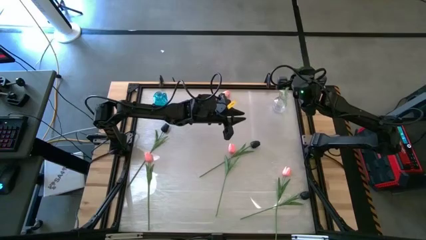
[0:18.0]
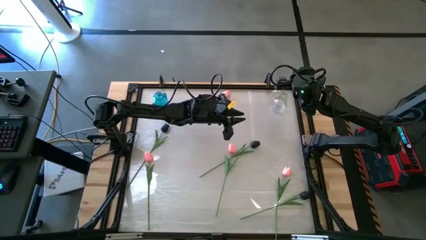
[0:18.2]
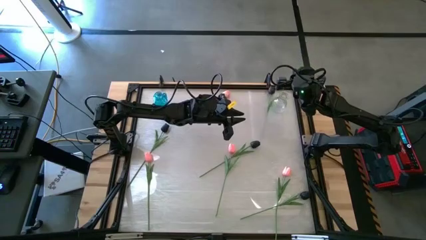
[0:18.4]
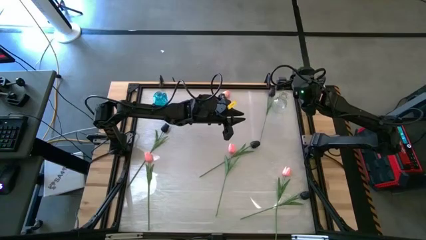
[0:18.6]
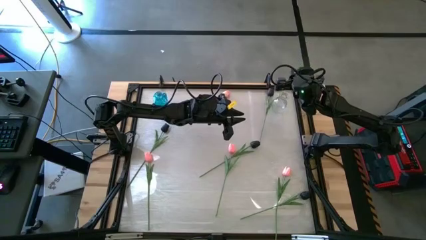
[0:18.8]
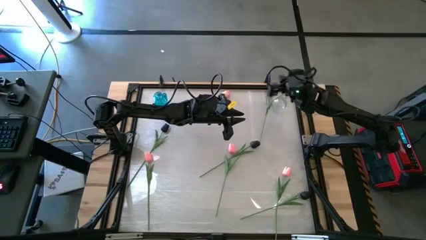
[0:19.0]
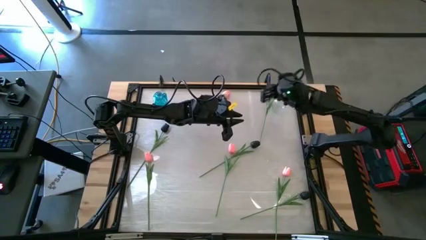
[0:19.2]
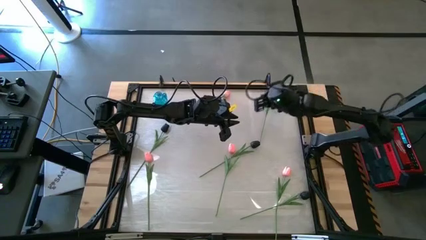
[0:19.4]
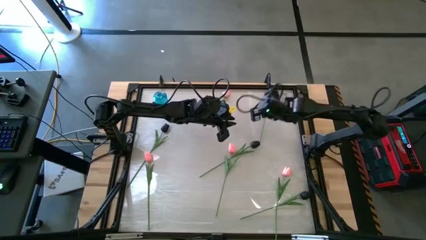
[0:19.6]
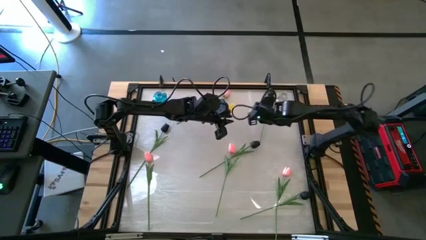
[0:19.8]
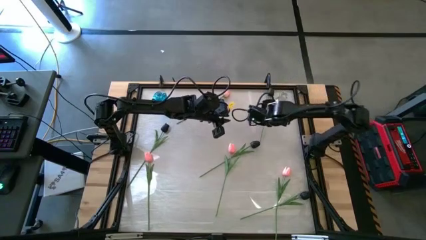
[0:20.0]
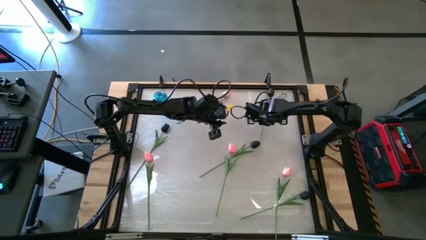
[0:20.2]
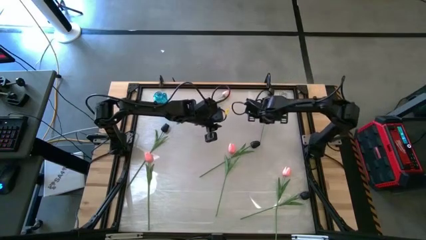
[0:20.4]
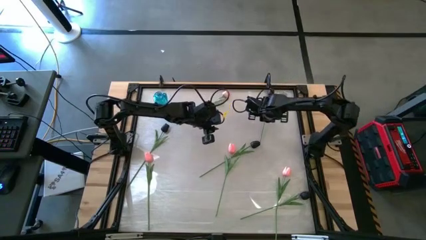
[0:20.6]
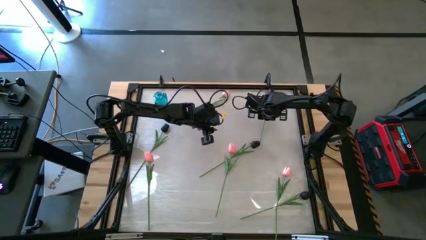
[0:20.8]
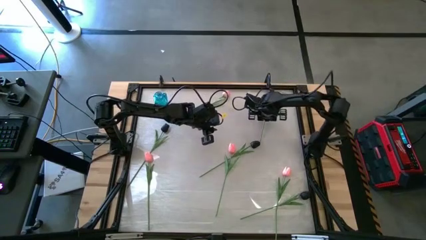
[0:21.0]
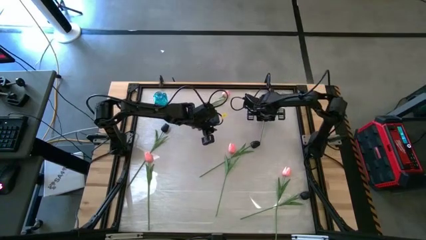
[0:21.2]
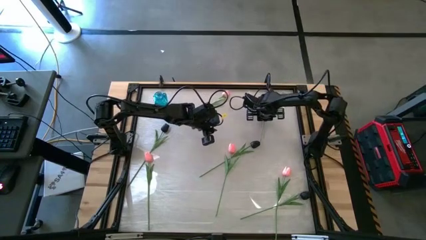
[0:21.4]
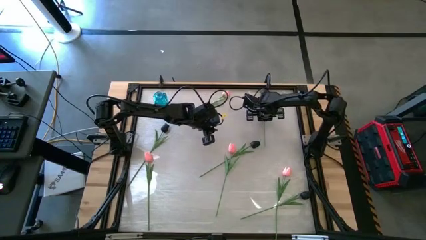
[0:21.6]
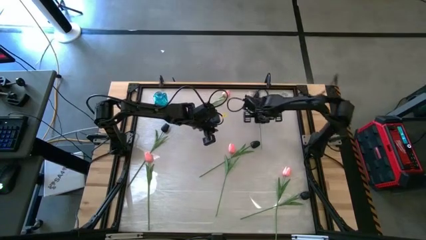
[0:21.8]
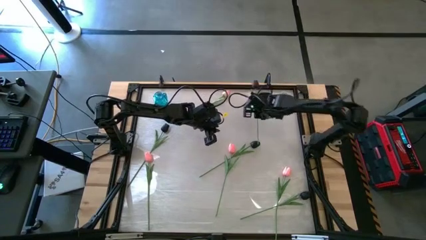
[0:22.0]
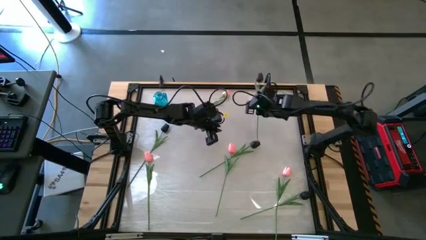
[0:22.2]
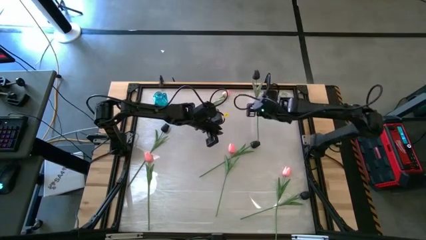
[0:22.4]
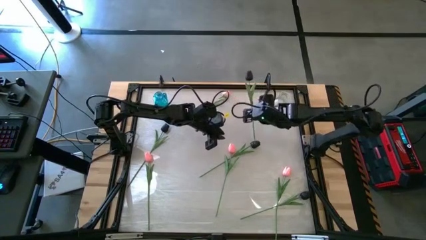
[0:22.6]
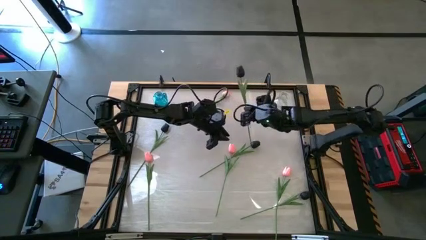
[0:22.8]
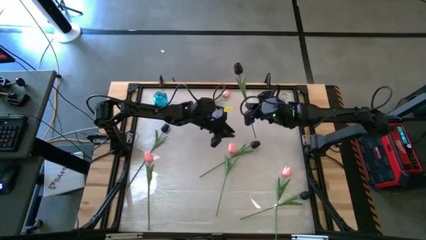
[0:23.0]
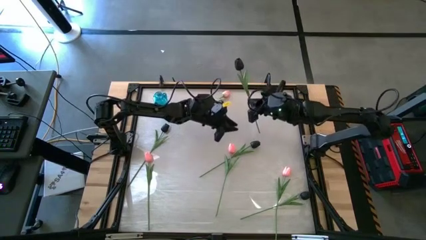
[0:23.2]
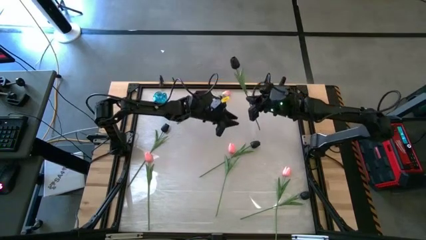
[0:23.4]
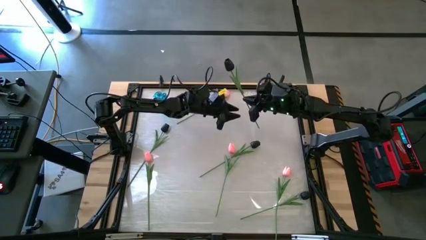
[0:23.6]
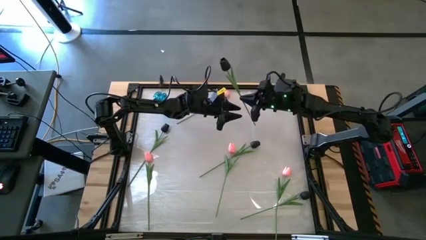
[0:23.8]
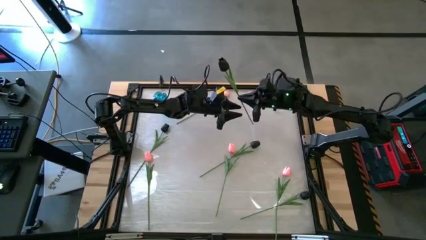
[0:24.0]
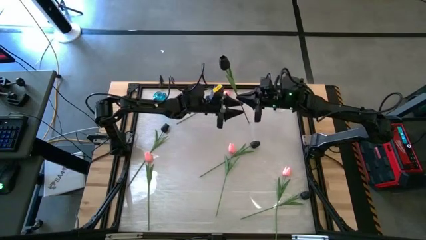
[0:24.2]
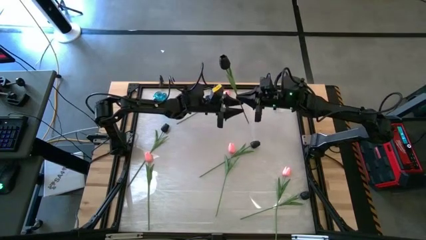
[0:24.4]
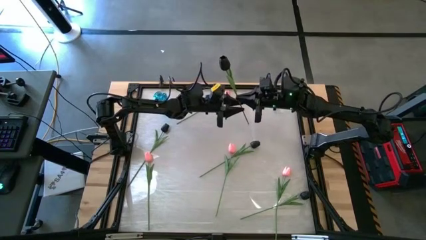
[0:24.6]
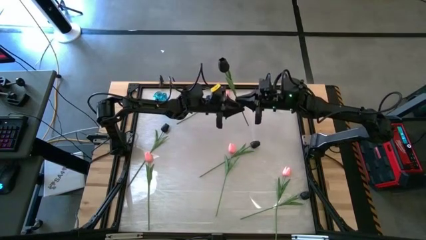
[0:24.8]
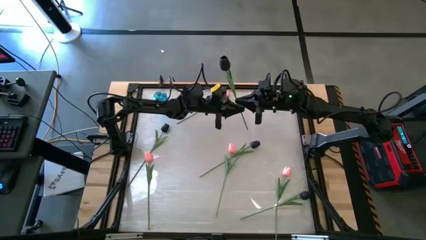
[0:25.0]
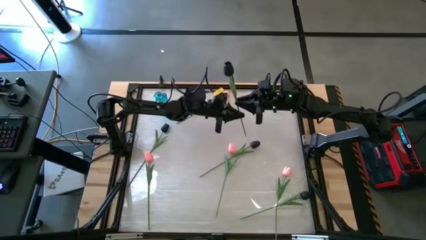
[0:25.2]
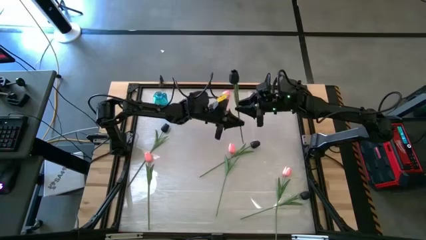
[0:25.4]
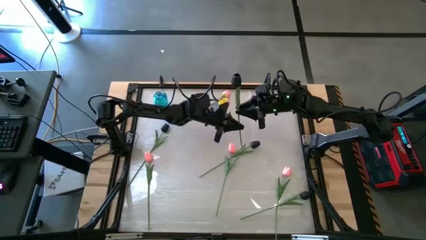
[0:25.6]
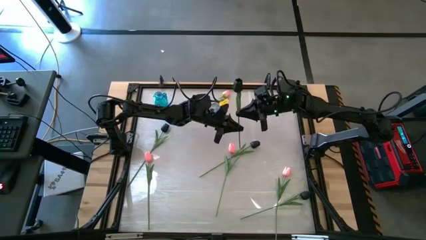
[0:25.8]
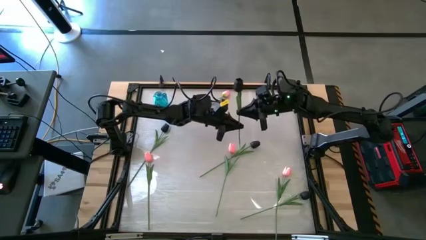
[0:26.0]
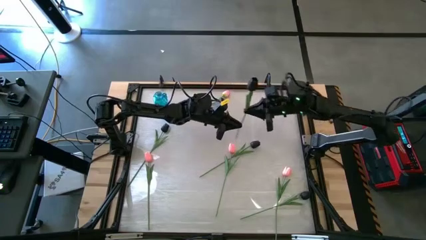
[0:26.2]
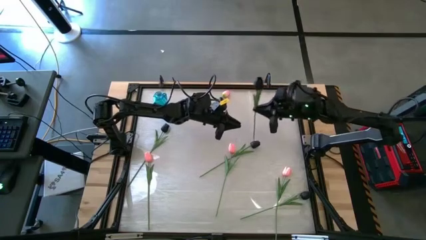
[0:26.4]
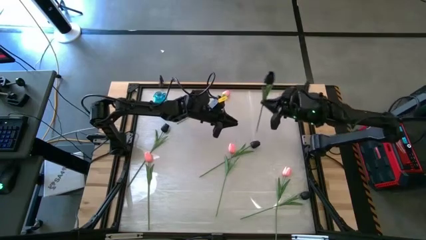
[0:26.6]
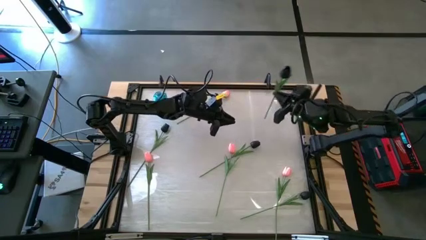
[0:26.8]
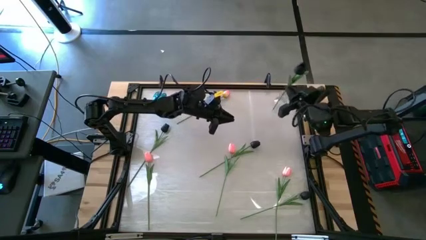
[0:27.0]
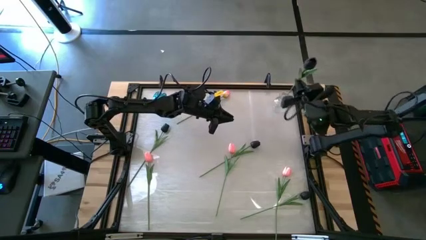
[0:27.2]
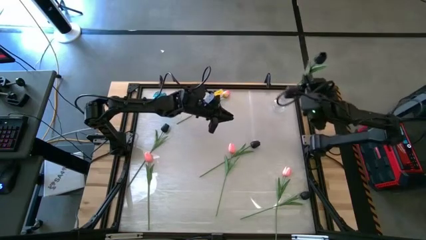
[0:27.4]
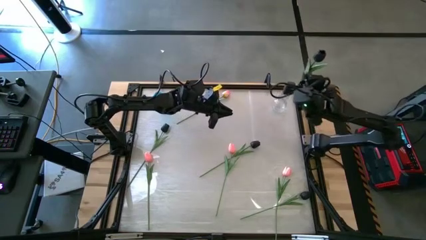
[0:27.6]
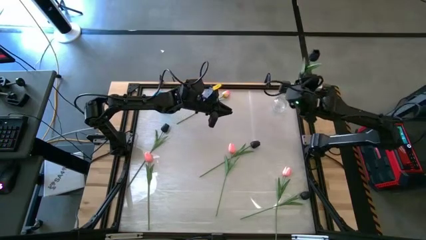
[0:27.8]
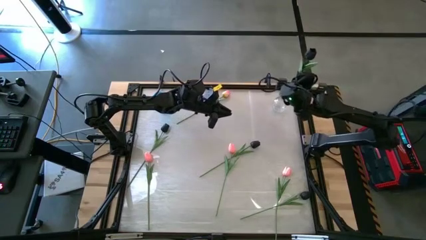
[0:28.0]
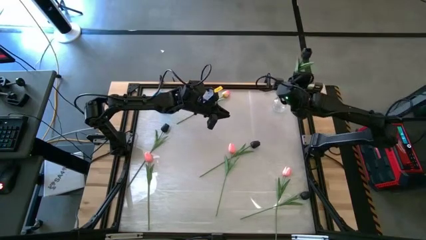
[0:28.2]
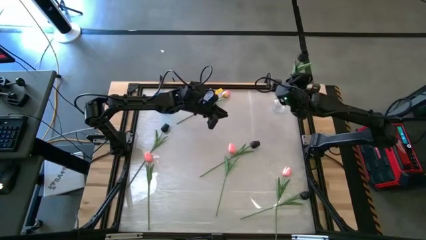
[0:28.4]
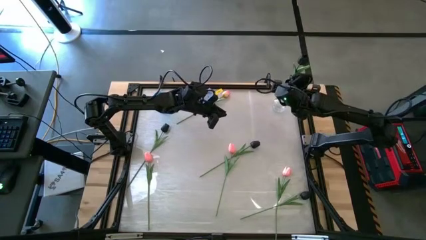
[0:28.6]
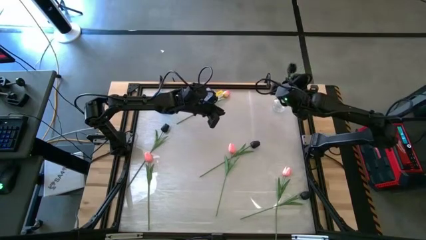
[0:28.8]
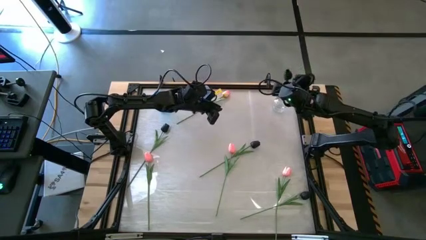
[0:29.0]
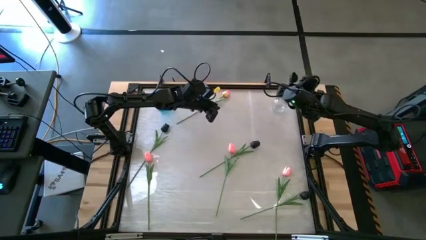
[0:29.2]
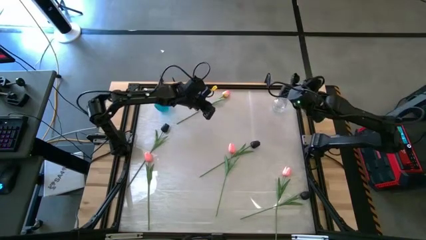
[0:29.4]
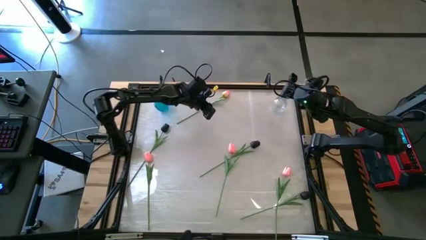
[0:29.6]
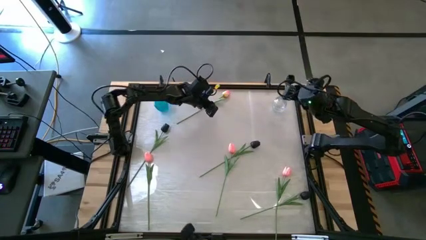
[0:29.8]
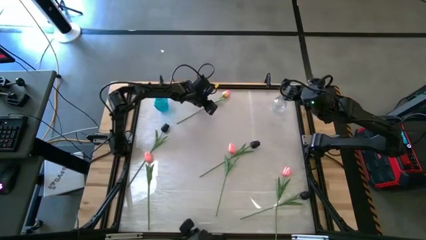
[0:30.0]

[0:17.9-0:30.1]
Task: Sort flowers into vase by color
Put the black flower into the transparent vase

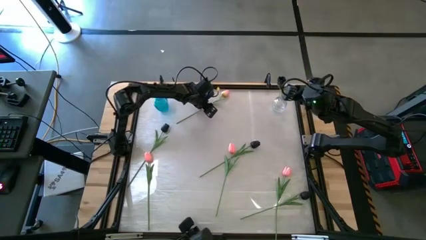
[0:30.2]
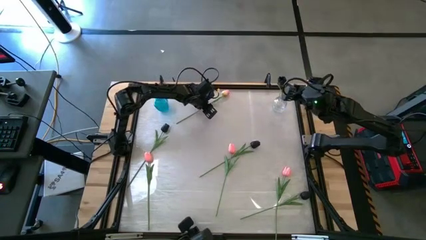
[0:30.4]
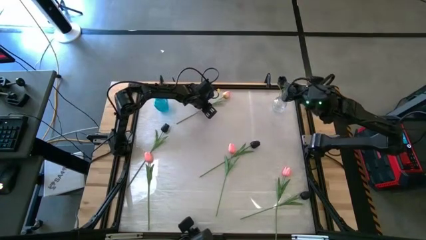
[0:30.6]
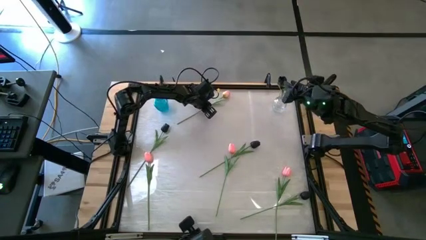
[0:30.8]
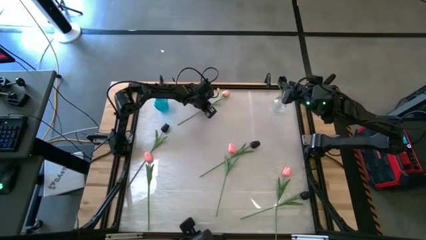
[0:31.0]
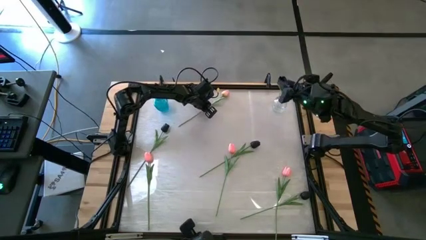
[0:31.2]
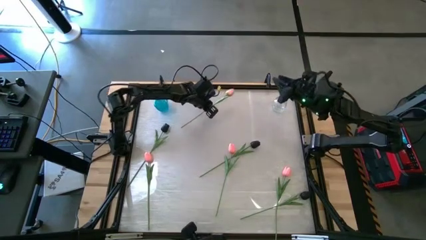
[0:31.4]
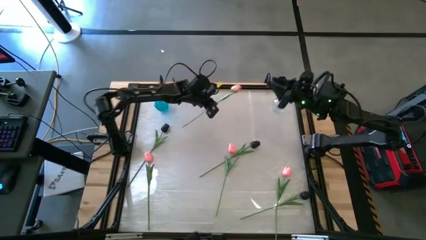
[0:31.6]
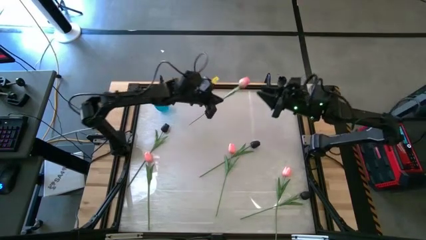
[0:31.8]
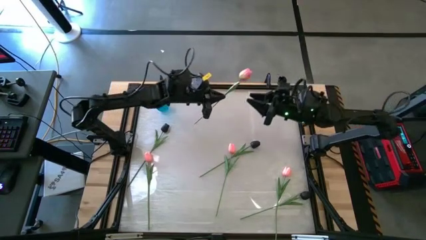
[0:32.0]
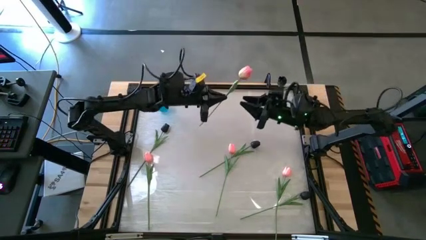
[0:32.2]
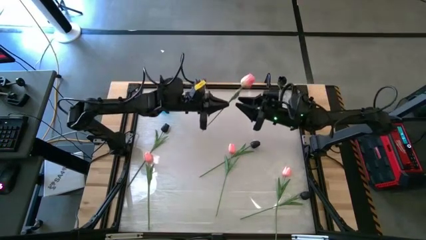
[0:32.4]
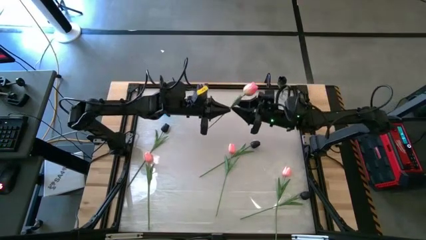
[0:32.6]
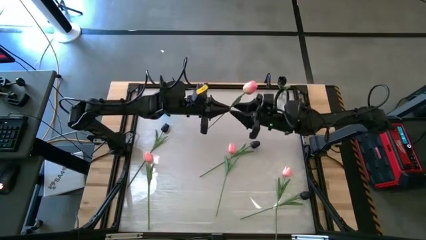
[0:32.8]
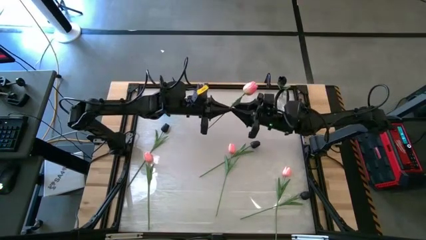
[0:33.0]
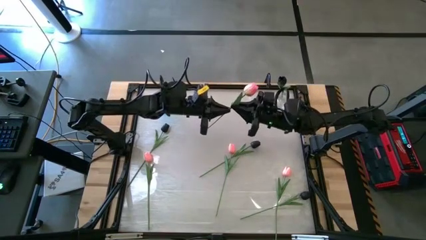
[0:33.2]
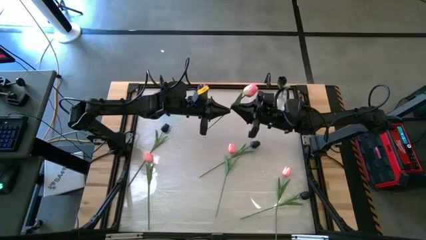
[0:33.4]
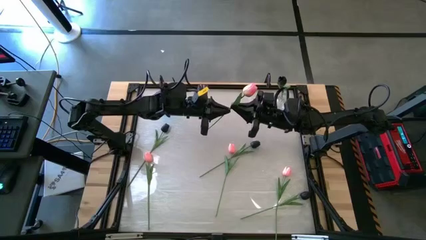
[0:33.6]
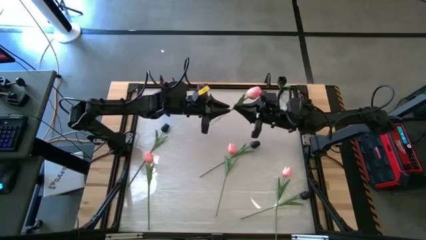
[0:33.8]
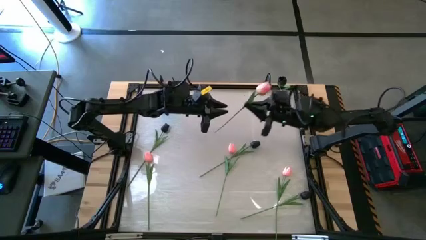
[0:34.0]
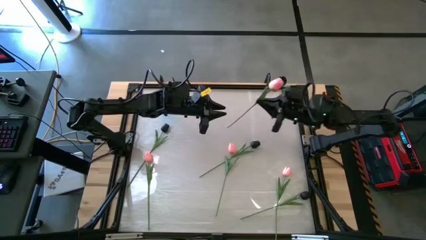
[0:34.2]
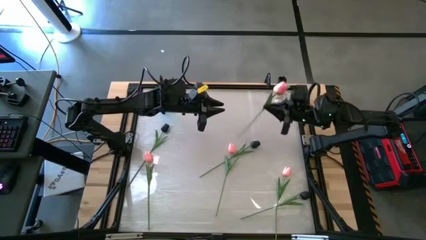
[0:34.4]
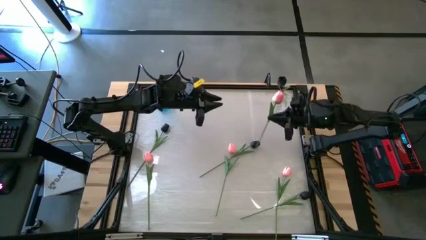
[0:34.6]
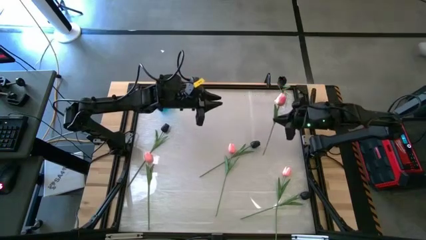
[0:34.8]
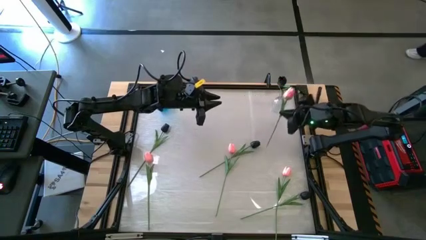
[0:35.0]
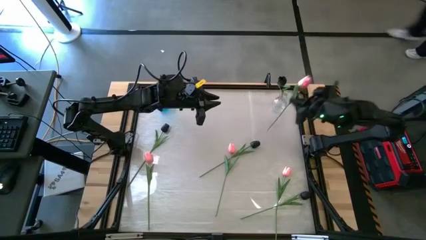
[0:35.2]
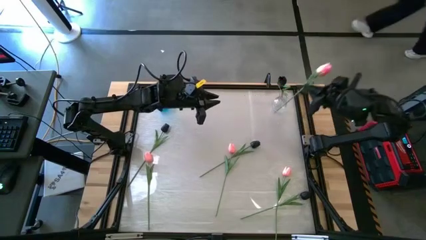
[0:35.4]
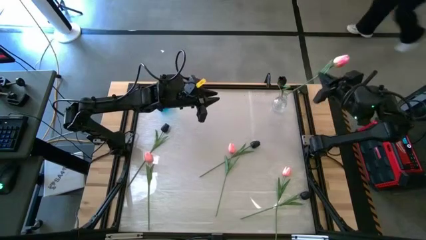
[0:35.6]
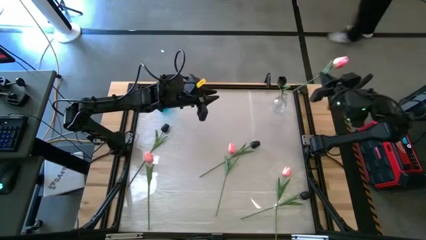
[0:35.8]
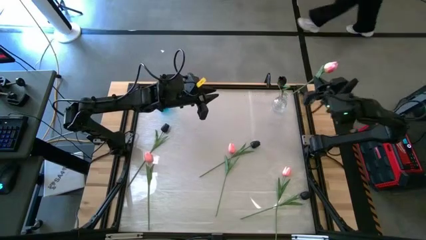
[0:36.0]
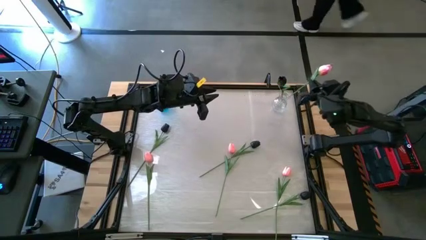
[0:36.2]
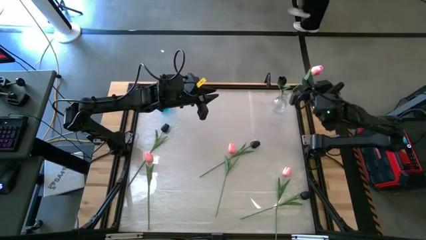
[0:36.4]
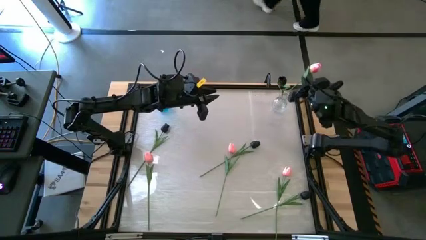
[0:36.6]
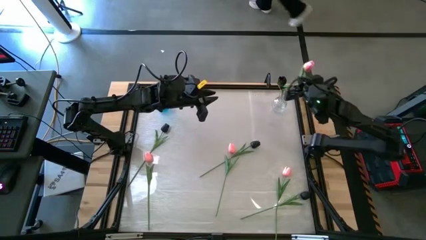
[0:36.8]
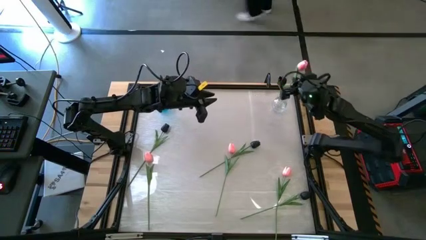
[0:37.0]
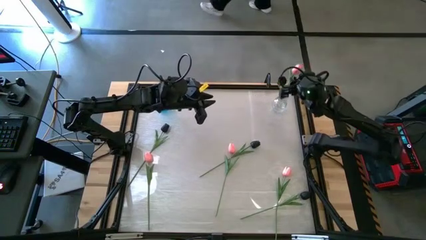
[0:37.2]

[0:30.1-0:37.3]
Put the pink flower into the transparent vase
